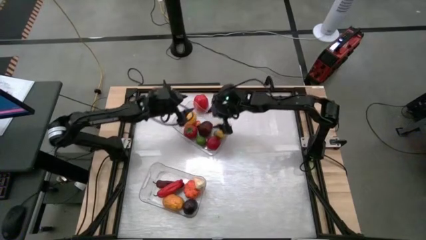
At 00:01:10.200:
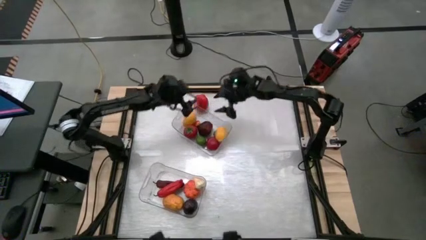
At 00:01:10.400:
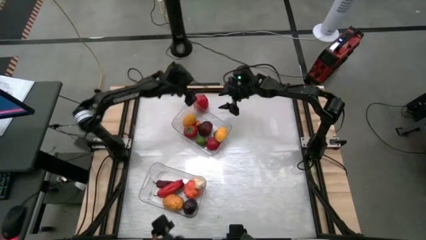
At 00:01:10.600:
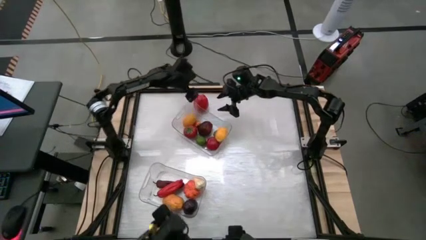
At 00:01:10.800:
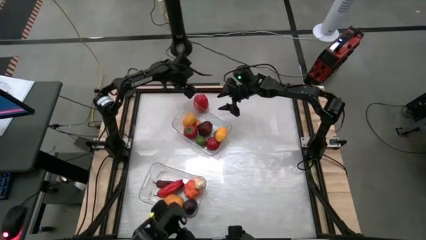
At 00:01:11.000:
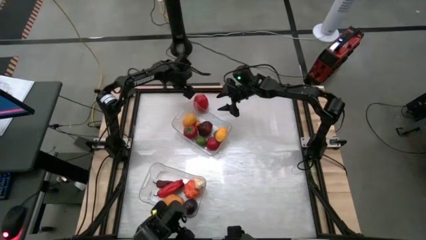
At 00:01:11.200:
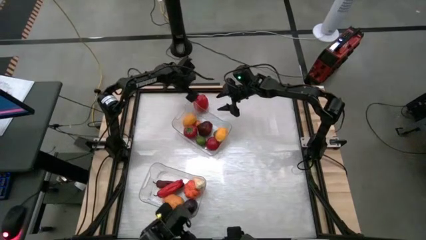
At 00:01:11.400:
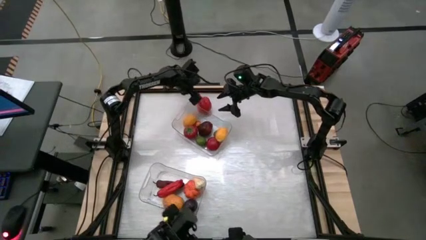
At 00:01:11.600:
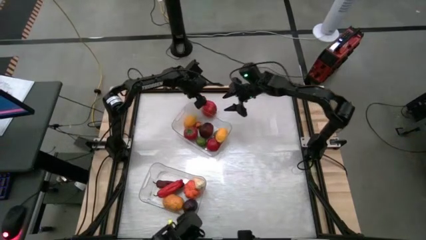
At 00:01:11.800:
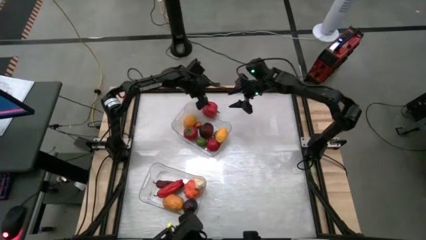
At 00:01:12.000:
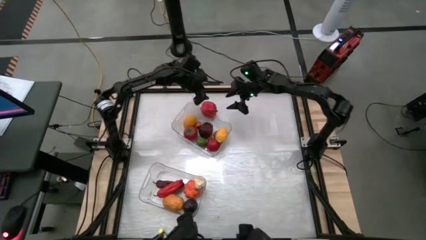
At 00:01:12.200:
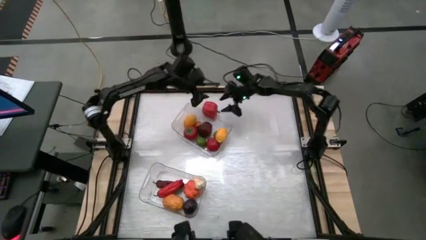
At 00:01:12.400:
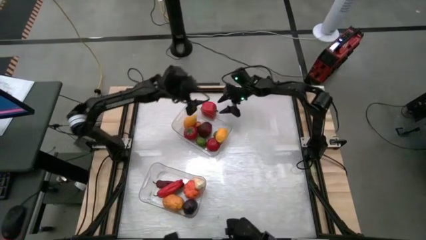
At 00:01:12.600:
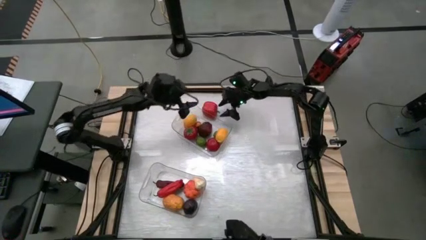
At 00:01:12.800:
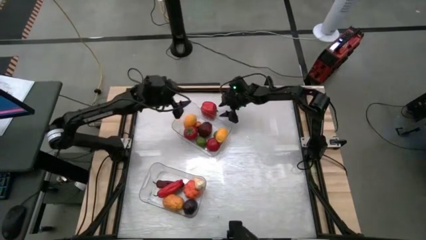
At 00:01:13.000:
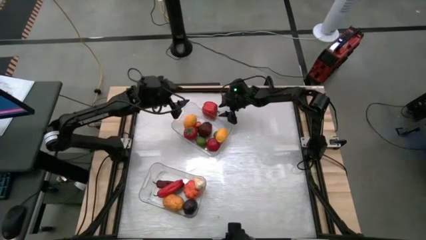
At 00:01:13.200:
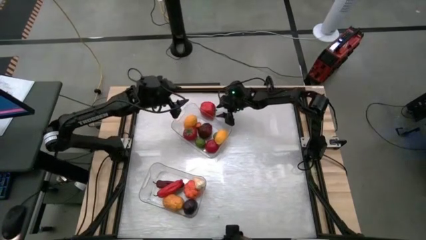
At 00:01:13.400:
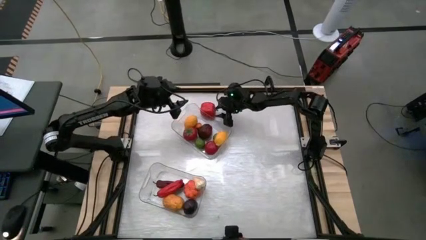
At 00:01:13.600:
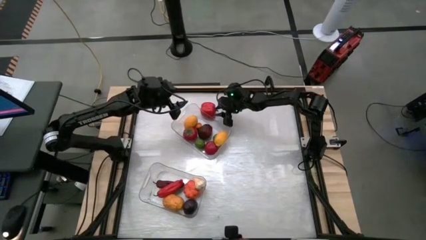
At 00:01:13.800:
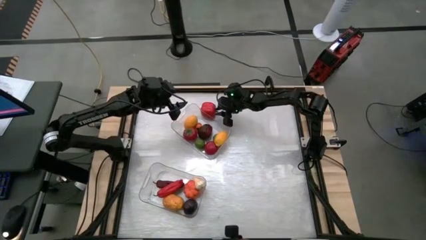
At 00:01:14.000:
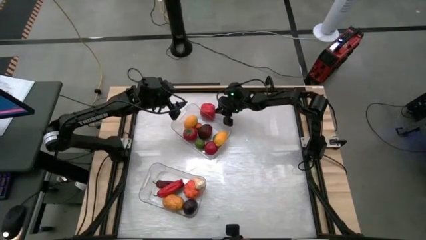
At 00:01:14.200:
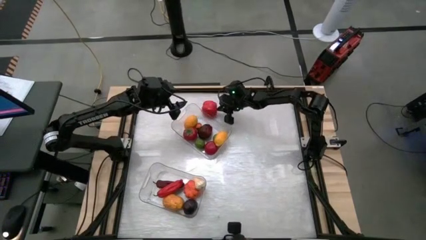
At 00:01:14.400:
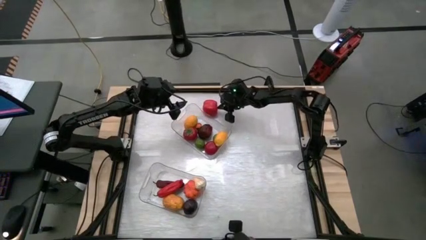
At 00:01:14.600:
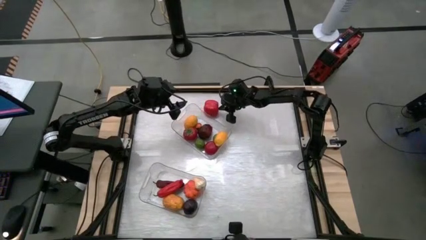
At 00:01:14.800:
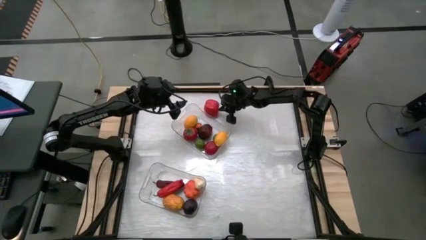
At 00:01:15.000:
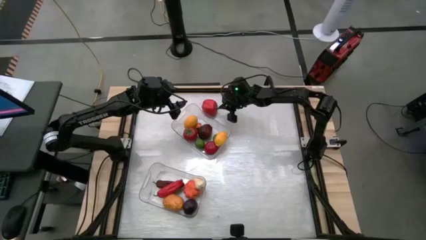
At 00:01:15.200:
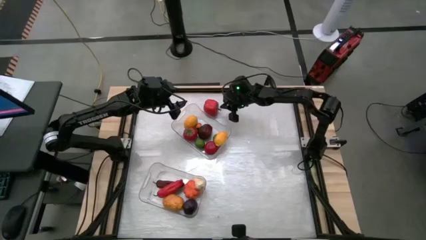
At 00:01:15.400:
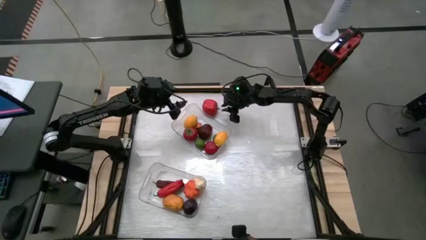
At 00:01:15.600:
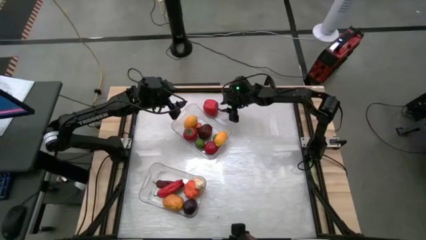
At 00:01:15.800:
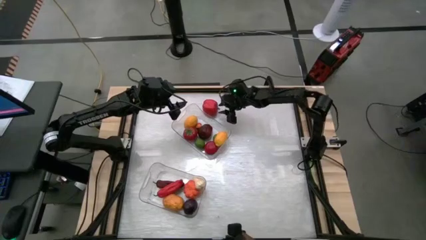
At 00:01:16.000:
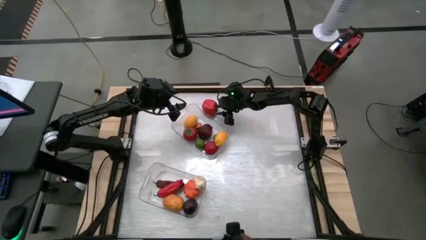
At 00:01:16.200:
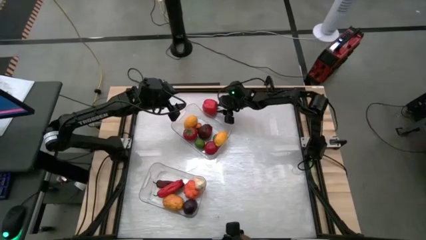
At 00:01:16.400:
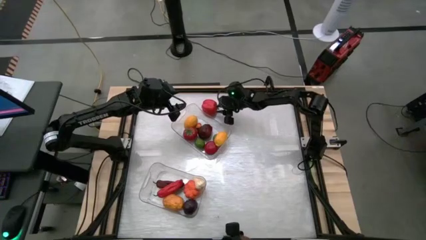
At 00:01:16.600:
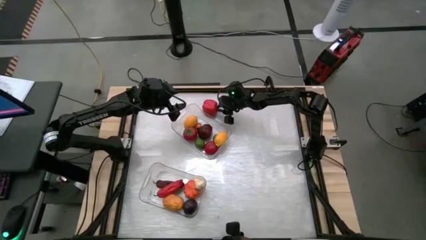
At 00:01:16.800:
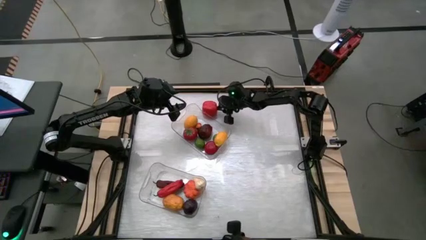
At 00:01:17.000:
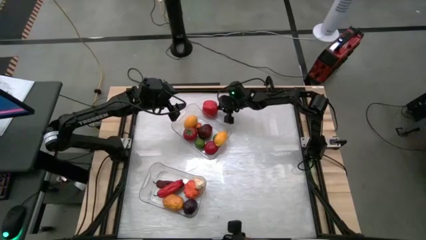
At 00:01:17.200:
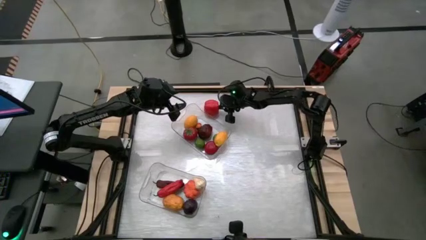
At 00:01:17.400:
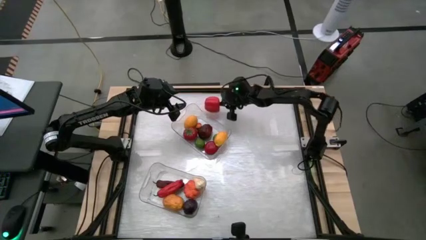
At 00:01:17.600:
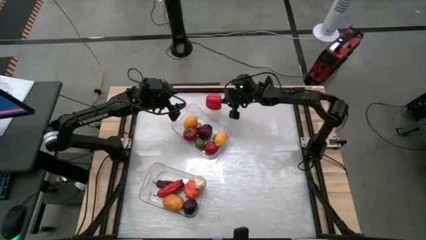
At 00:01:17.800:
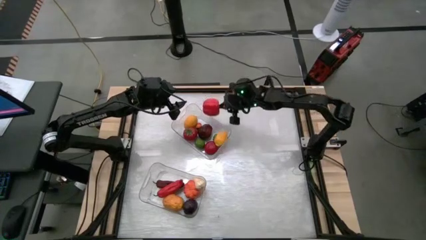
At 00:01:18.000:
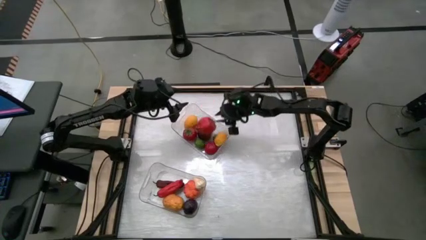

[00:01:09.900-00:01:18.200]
Task: Sort produce into baskets
Put the red bell pepper into the bottom transparent bin

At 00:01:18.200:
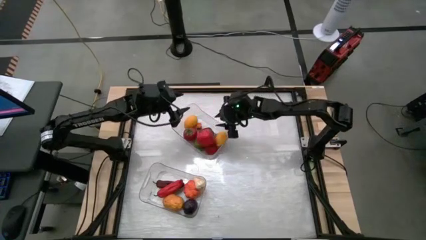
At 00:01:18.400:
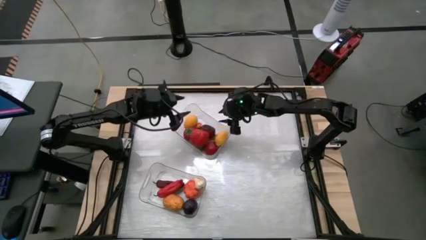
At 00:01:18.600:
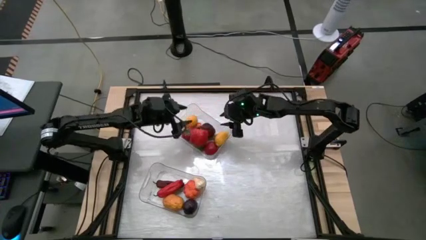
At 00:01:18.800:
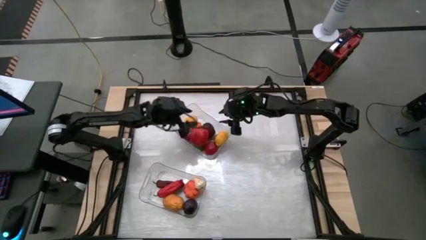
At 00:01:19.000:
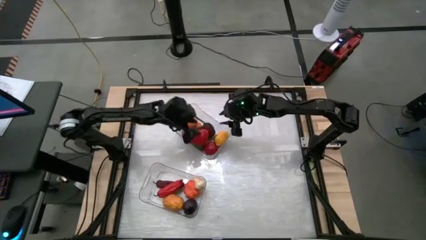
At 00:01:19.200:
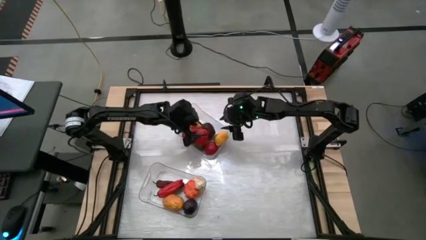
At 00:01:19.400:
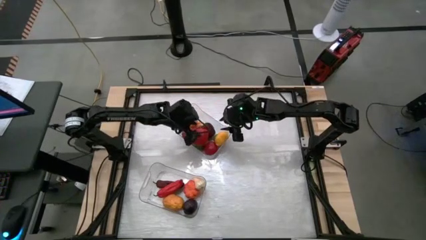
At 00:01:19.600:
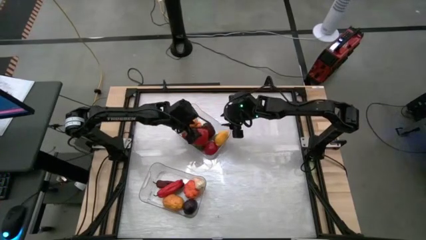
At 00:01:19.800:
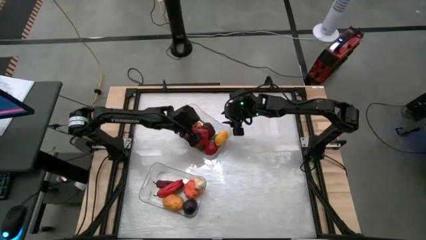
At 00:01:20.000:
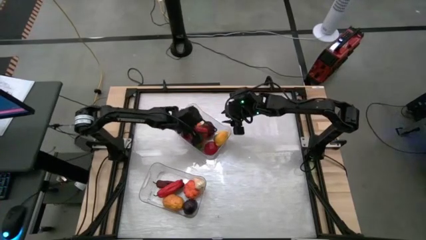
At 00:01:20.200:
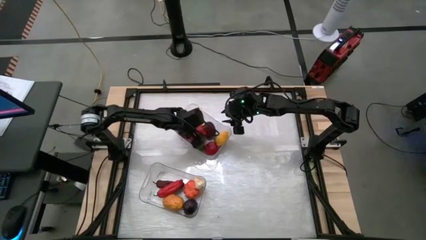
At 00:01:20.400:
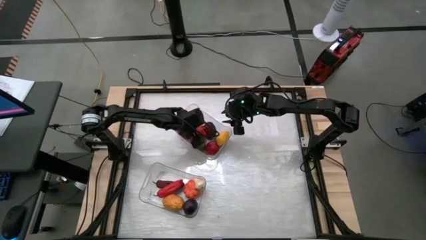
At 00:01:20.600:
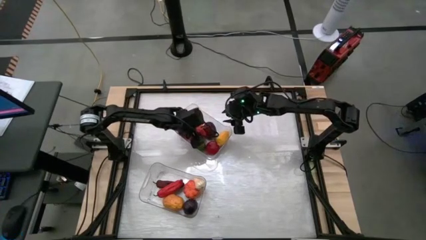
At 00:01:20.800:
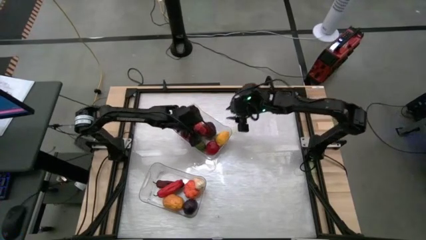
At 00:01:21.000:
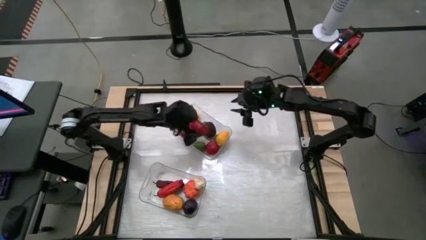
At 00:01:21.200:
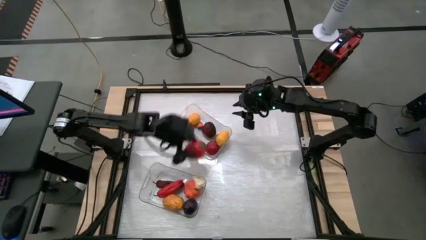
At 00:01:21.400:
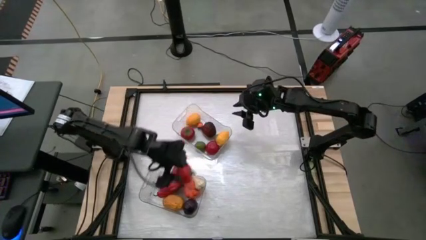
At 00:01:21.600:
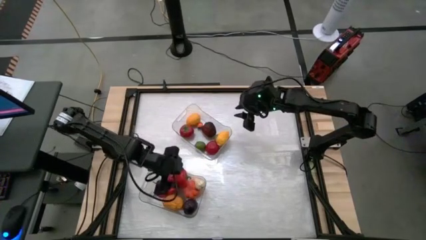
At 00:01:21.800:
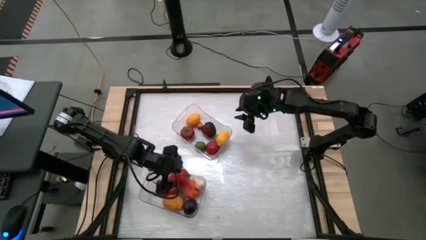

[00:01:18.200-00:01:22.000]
Put the red bell pepper into the bottom transparent bin

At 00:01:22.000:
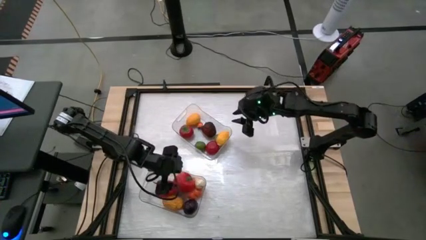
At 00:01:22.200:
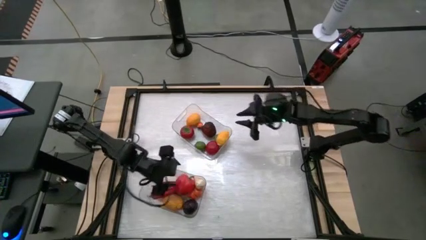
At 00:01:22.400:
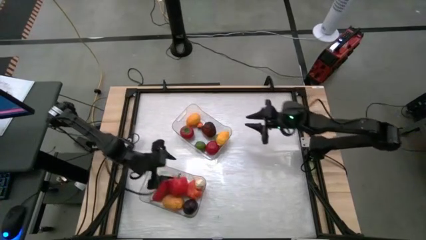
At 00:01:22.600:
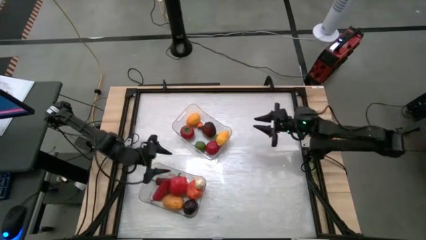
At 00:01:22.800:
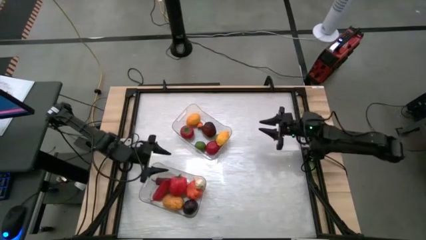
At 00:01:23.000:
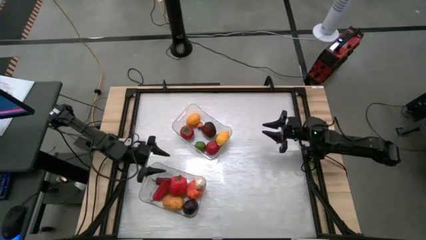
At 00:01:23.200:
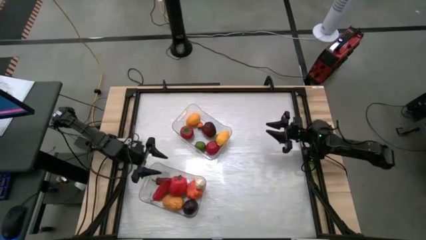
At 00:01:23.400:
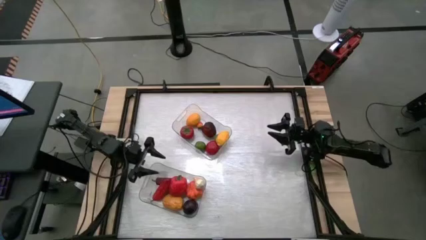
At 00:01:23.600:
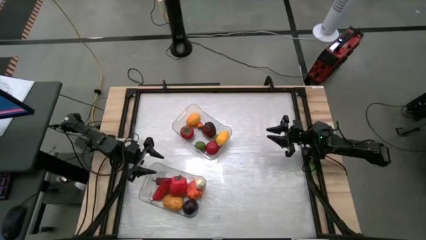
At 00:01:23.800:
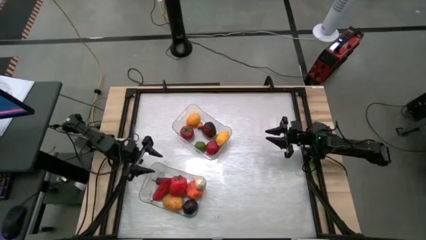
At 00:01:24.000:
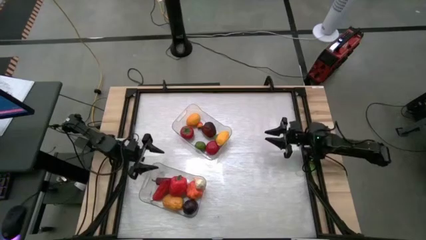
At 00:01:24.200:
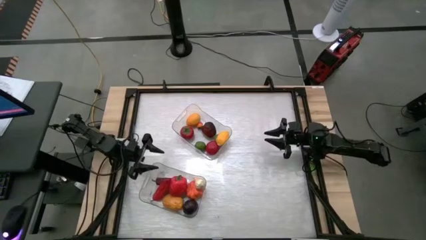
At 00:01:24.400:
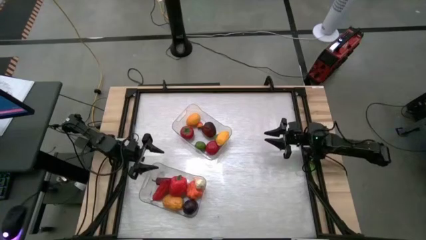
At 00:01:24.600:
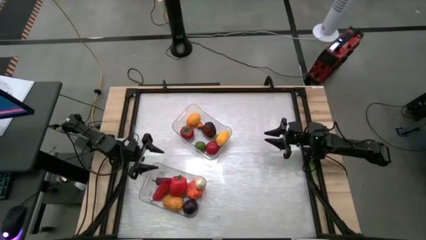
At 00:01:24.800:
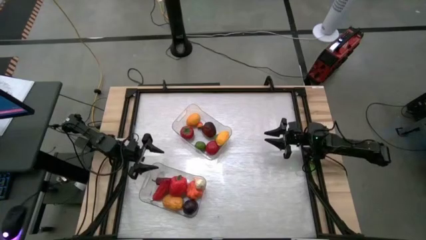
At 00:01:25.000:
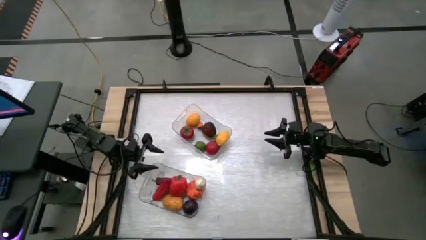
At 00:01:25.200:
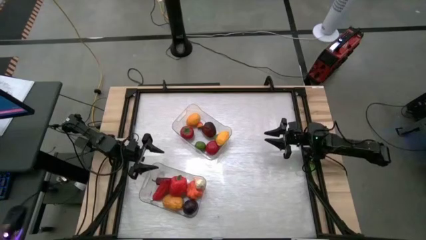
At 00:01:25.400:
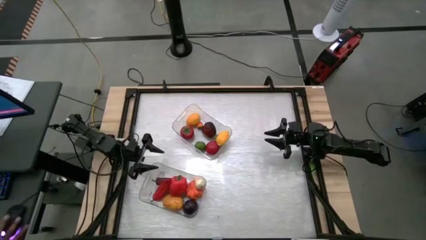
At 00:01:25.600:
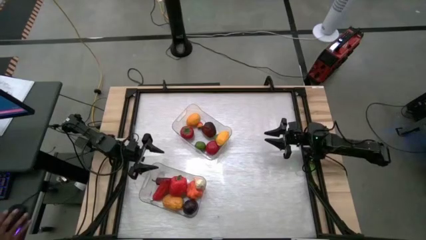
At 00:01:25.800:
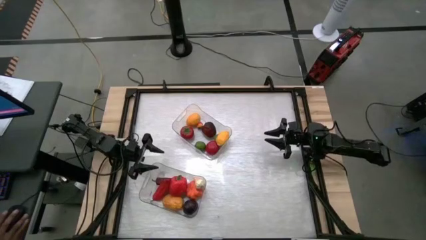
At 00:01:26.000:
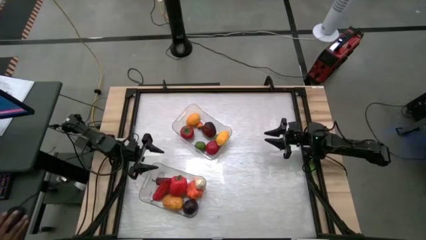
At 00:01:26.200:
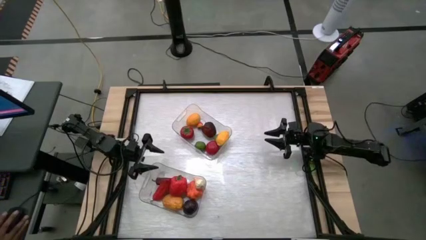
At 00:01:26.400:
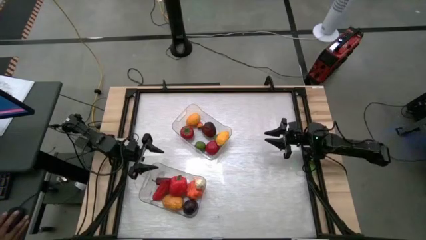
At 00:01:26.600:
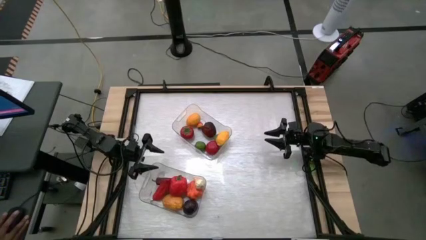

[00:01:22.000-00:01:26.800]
Return to home position
